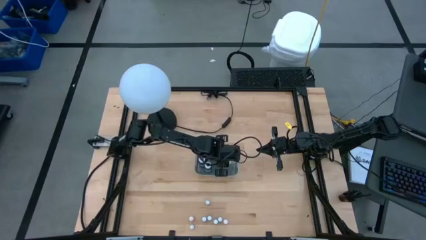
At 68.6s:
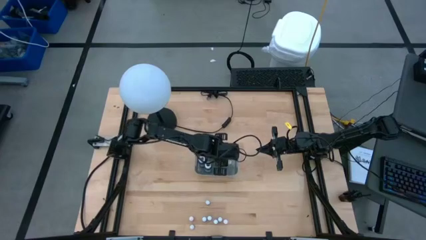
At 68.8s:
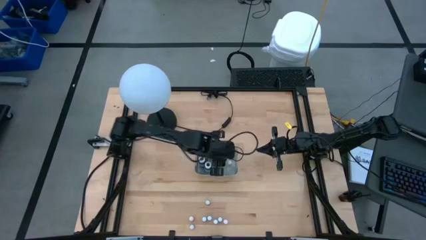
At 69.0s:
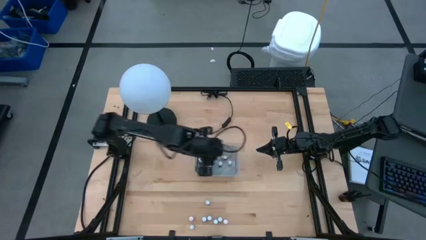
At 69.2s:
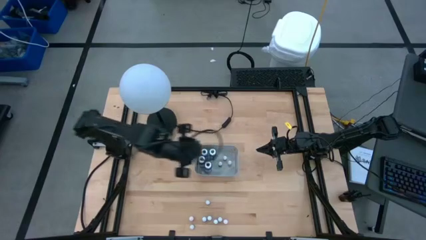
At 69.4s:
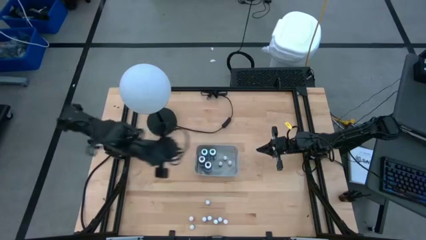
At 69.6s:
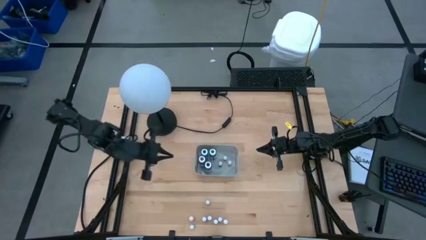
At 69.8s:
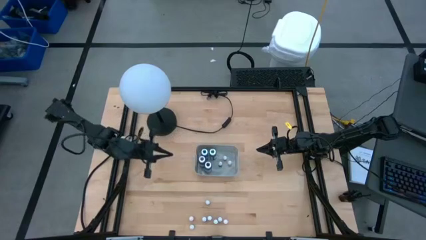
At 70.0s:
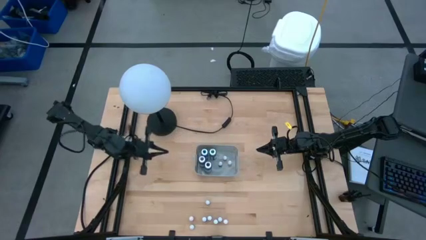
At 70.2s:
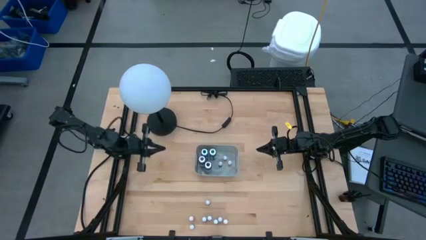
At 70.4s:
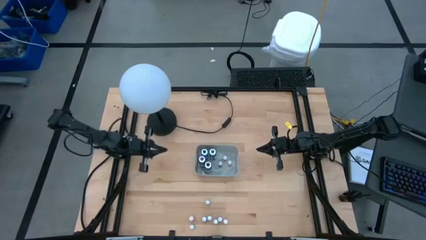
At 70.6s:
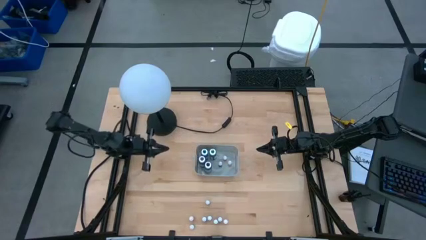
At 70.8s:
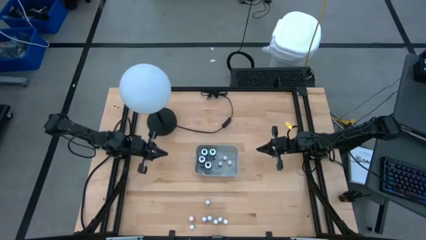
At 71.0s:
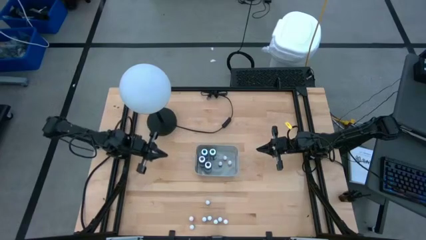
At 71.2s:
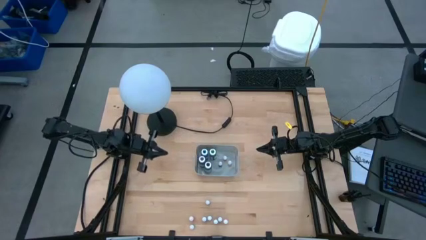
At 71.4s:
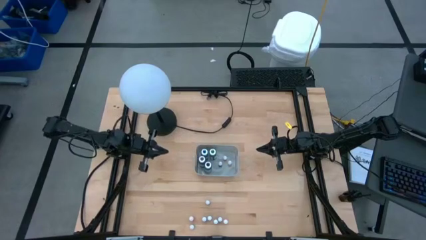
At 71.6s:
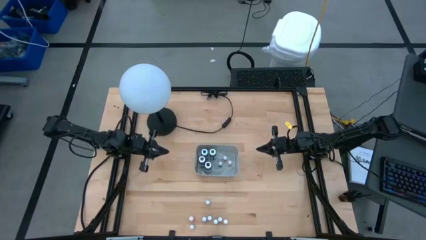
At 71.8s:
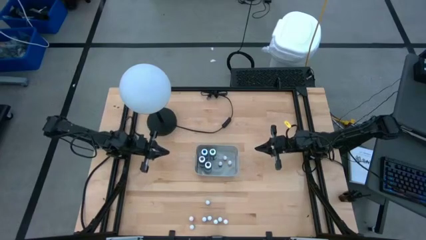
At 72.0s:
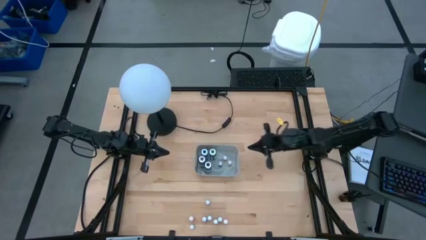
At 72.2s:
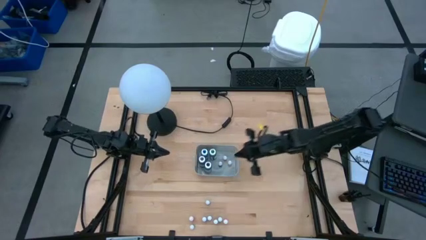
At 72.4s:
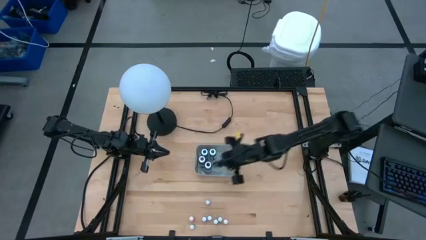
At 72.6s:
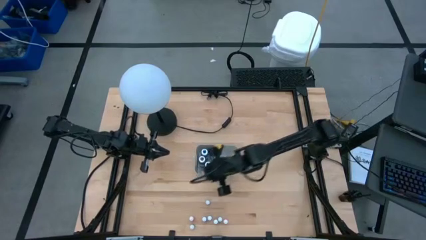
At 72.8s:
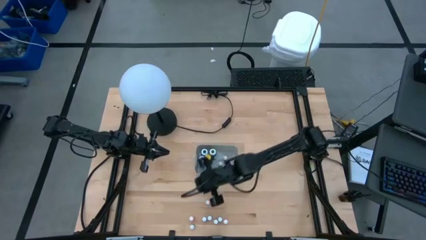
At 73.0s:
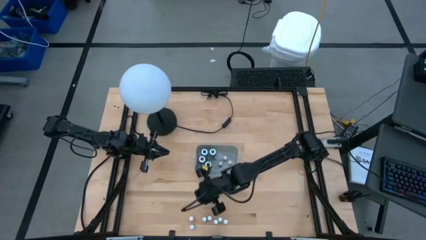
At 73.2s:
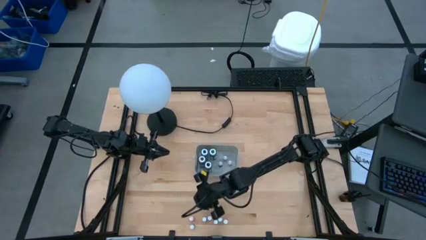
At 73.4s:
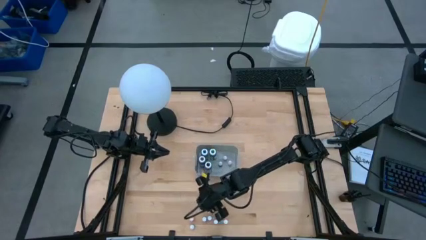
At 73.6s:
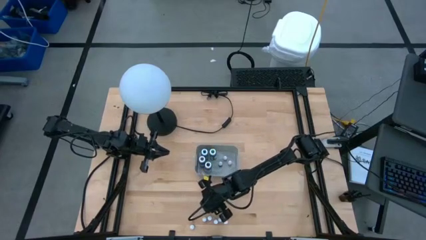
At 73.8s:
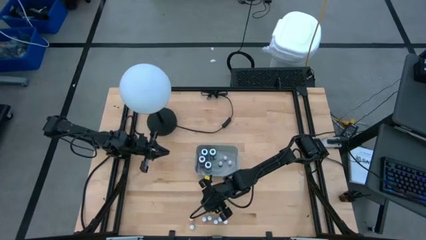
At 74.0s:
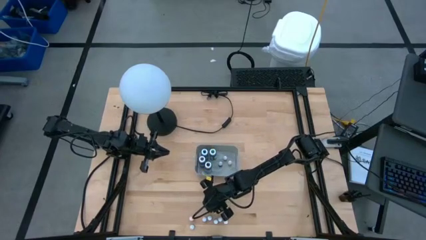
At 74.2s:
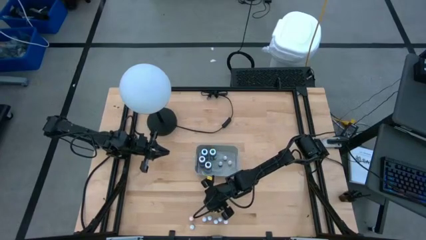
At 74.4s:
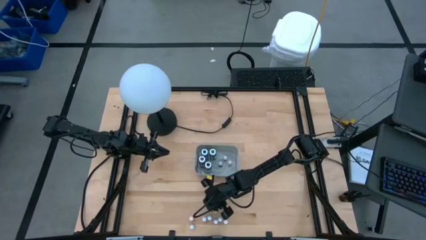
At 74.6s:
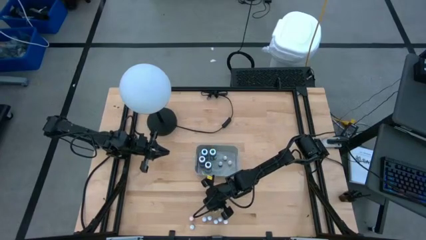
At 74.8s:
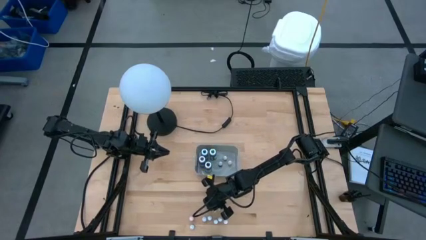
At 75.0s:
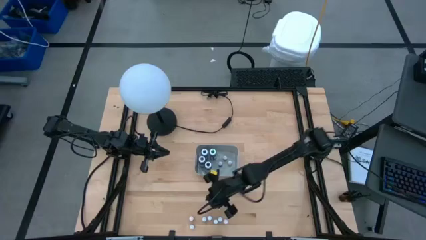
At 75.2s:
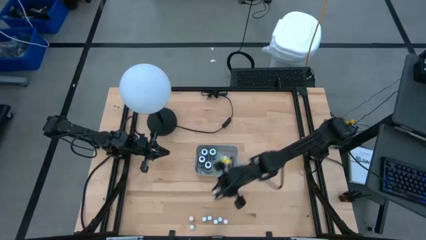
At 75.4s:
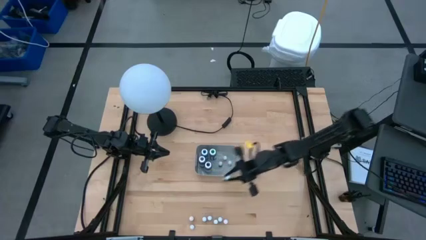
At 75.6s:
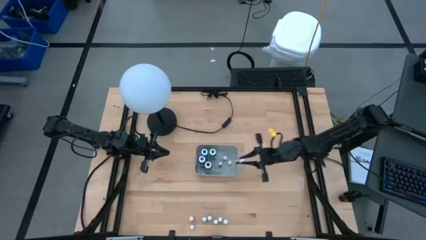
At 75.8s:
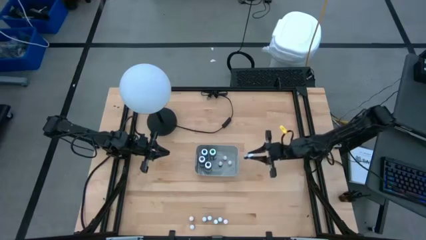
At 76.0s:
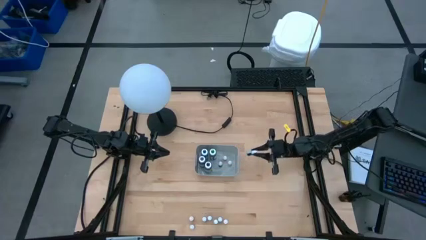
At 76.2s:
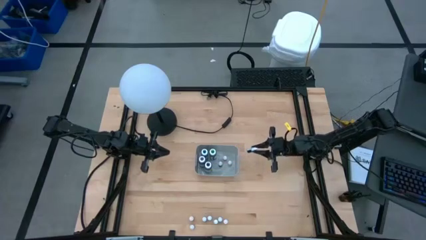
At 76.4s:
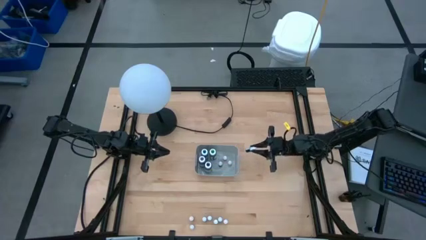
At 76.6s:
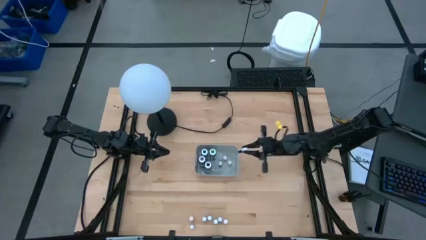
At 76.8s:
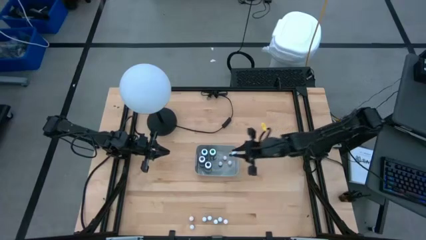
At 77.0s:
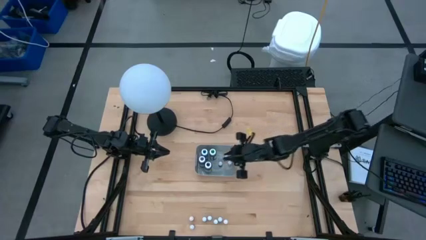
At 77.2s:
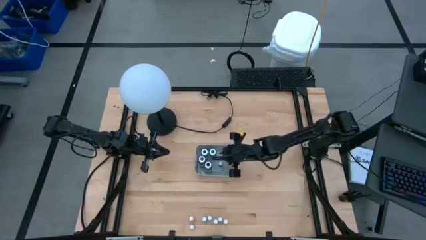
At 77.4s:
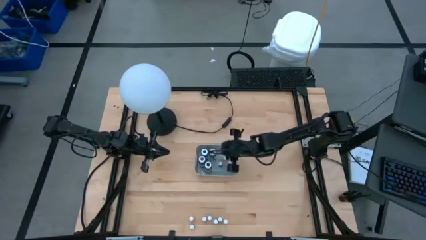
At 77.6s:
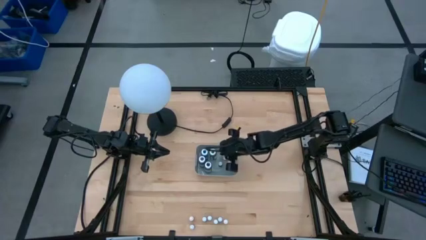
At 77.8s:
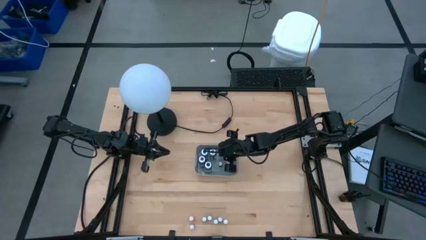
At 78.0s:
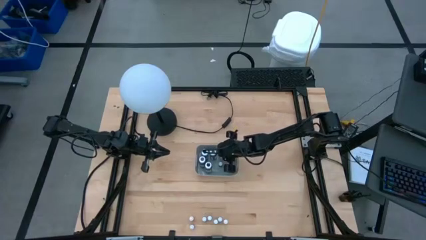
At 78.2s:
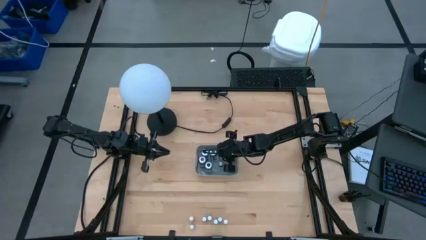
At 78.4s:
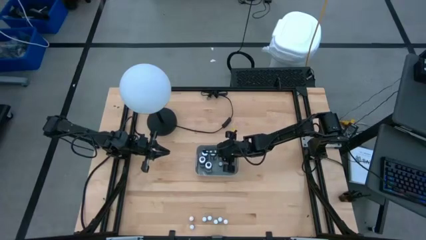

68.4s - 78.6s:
Task: Pick & Place food coloring
Put the small blue food coloring bottle into the gray bin

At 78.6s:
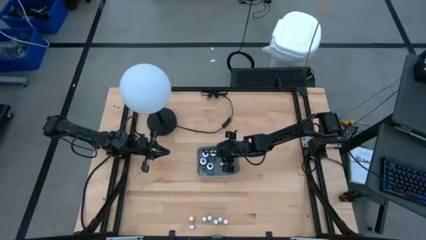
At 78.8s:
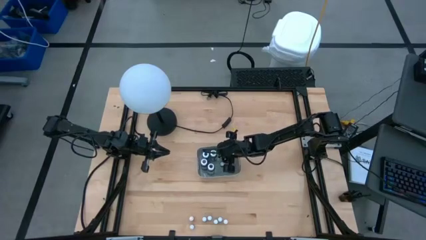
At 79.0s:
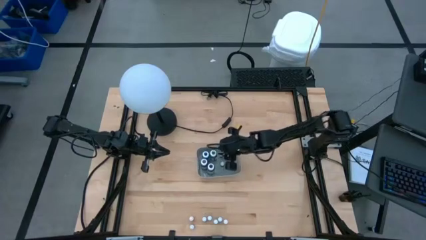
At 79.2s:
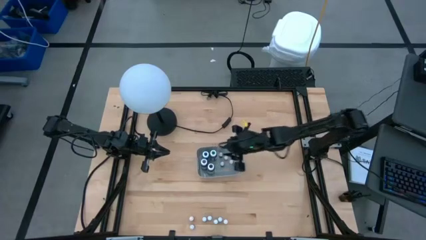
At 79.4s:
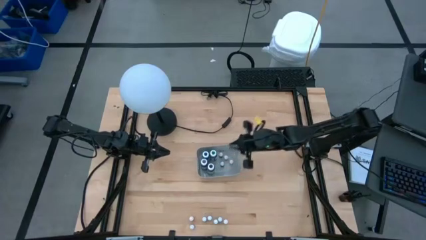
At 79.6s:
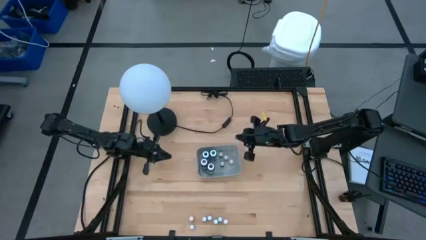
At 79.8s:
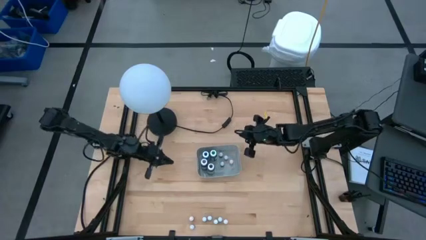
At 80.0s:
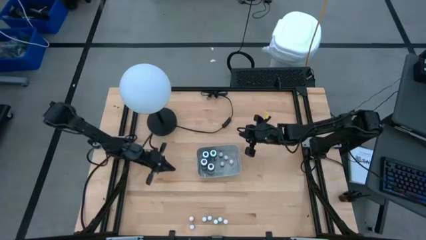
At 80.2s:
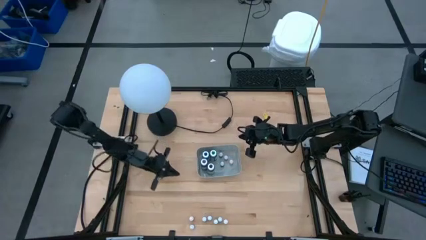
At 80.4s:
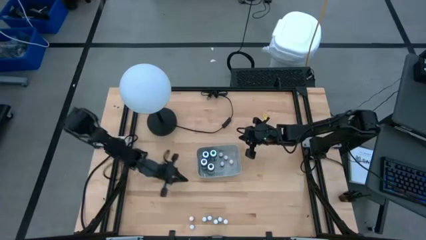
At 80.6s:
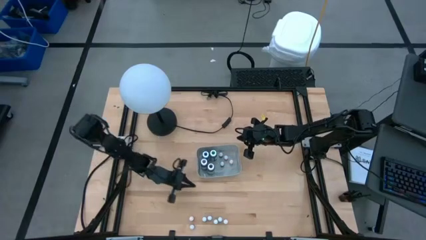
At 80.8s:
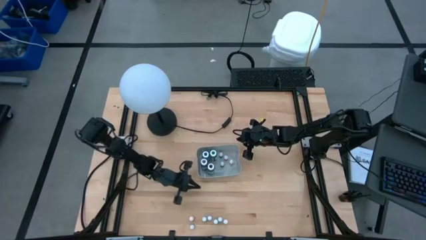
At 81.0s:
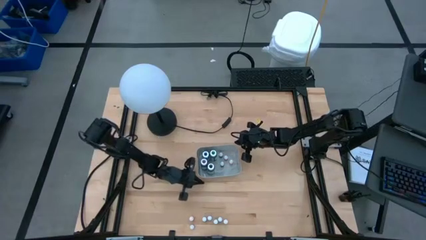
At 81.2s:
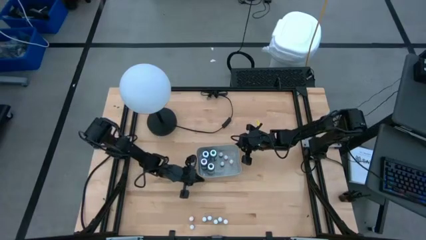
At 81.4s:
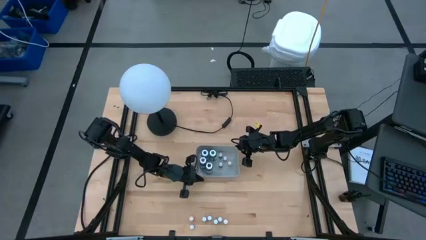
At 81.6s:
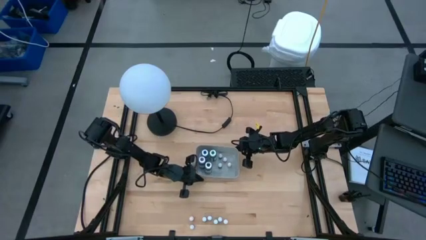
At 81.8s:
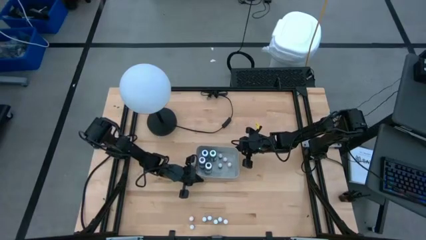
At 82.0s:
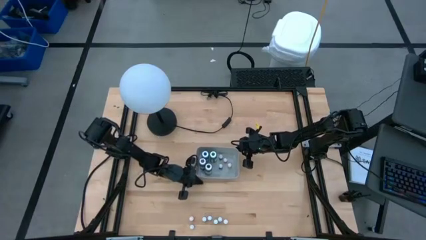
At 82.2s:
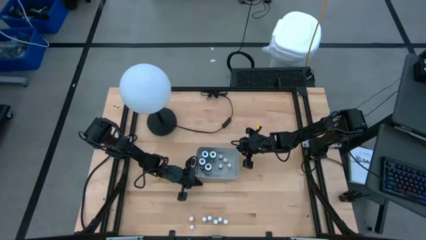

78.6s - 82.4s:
Adjust the gray bin

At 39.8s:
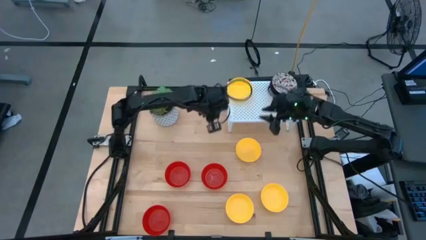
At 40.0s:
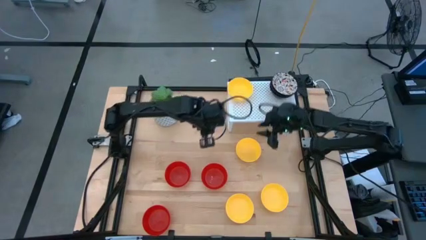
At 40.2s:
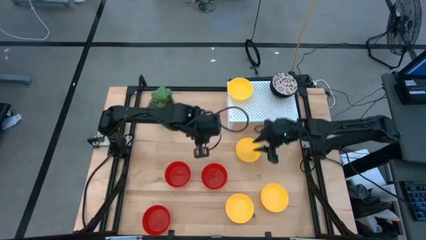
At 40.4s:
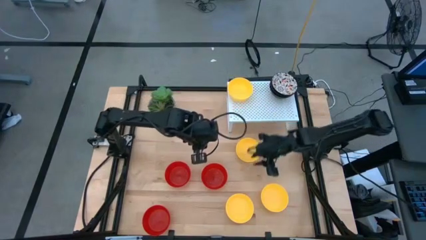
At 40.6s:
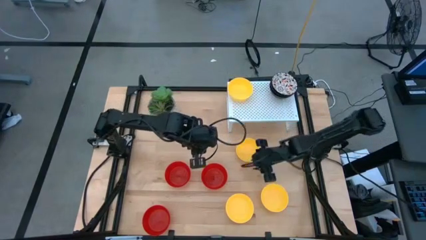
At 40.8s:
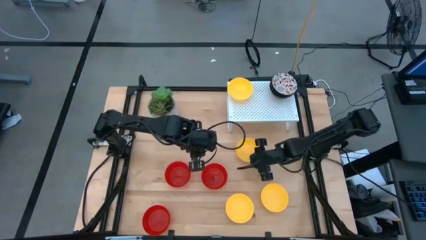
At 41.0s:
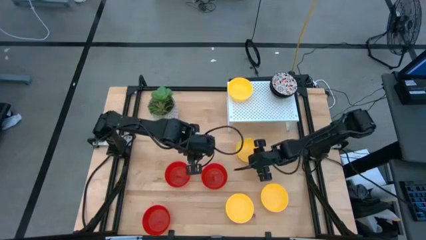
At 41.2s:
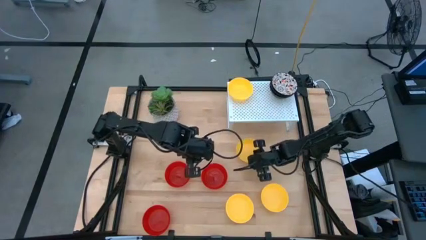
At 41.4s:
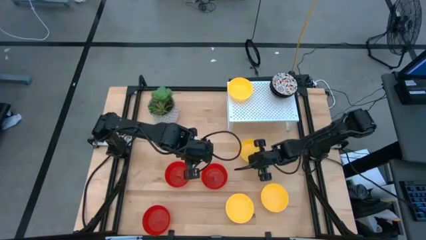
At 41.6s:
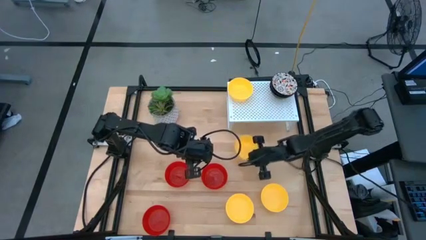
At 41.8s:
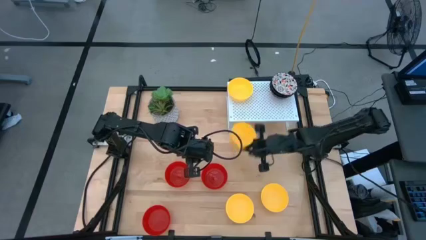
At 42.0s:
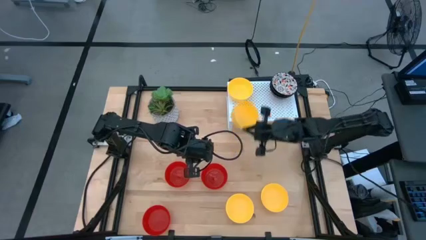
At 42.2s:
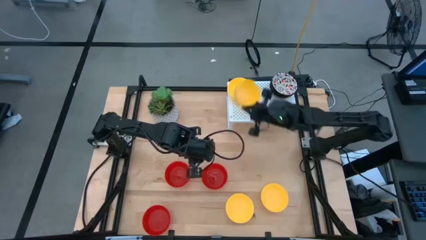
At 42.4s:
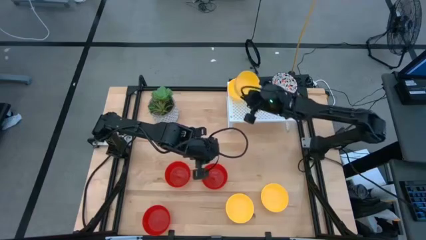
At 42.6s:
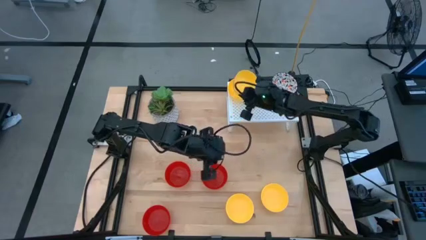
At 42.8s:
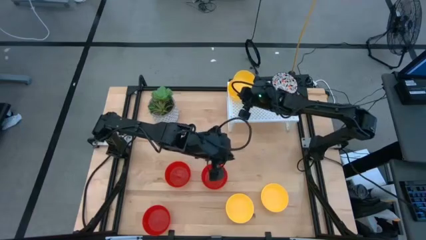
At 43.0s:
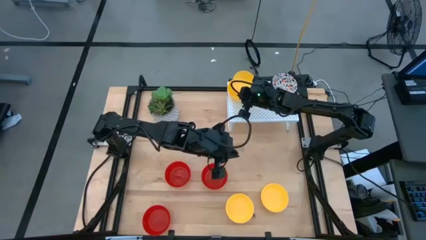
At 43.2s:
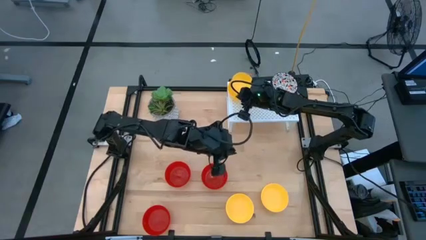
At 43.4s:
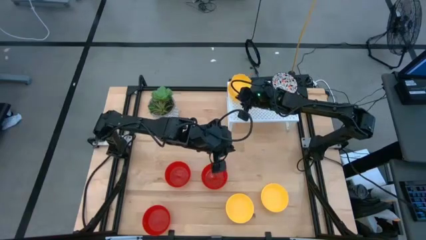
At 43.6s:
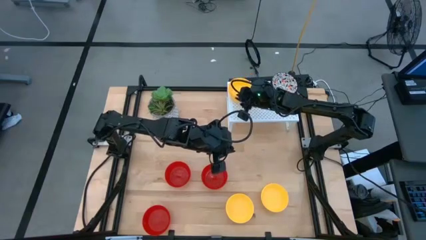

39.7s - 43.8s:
Task: Pick & Place Mini bowls
Stack the yellow bowl on top of the yellow bowl on the shelf
